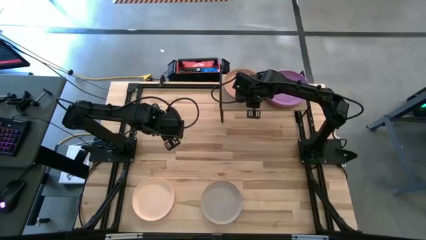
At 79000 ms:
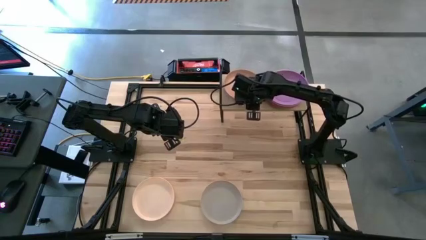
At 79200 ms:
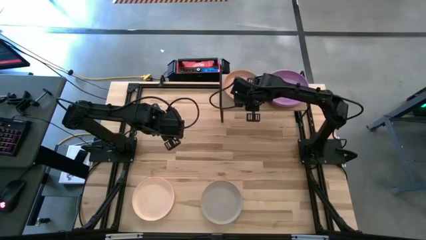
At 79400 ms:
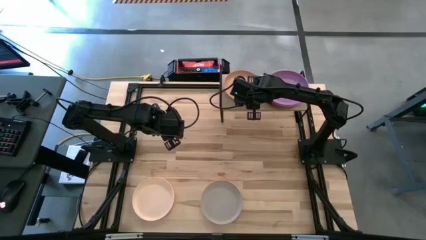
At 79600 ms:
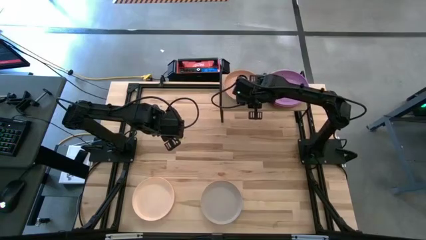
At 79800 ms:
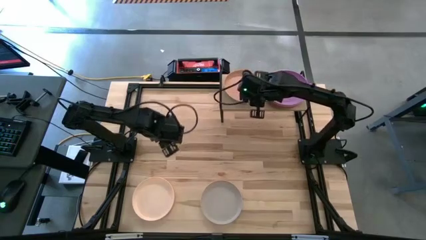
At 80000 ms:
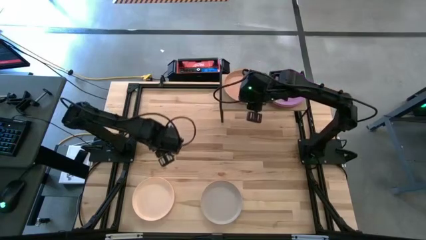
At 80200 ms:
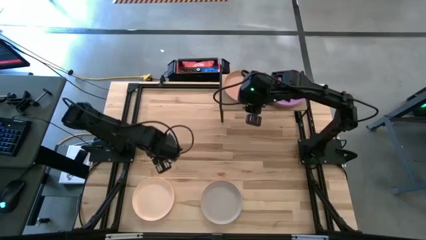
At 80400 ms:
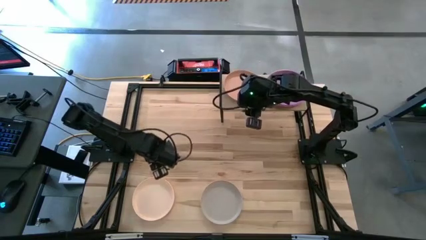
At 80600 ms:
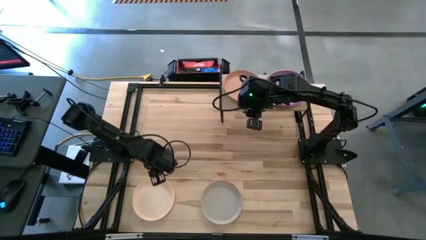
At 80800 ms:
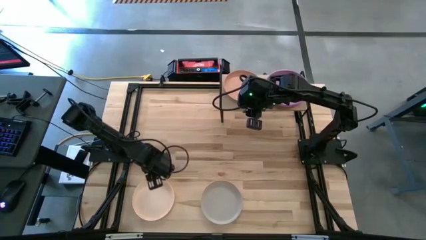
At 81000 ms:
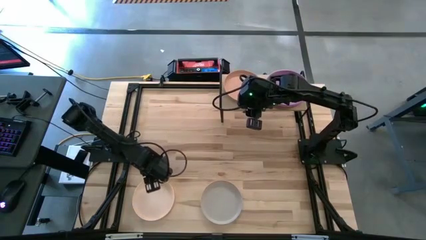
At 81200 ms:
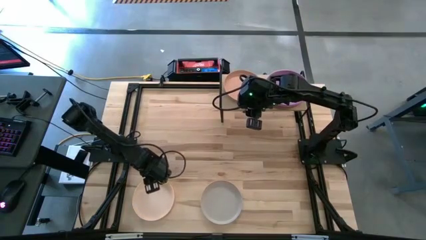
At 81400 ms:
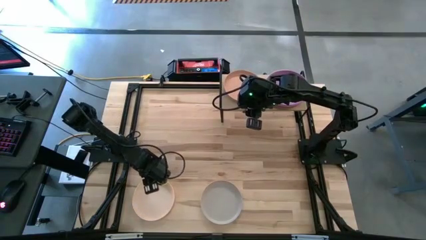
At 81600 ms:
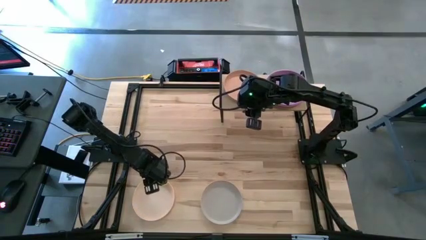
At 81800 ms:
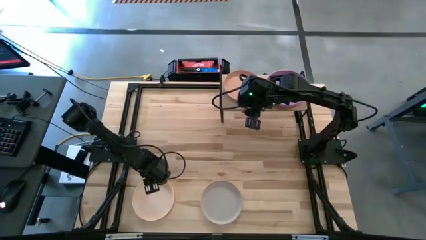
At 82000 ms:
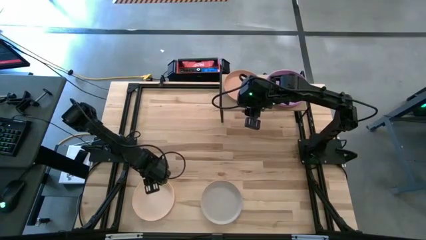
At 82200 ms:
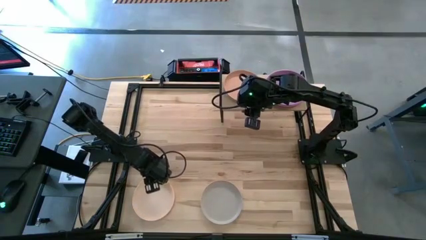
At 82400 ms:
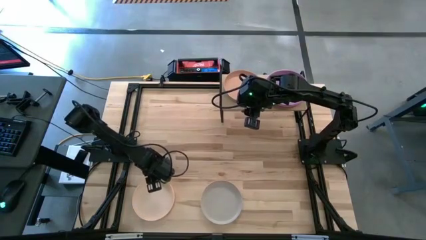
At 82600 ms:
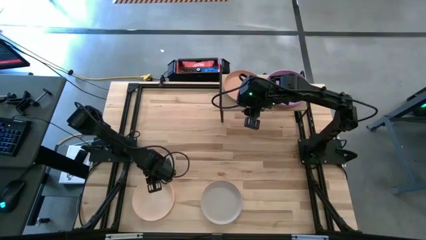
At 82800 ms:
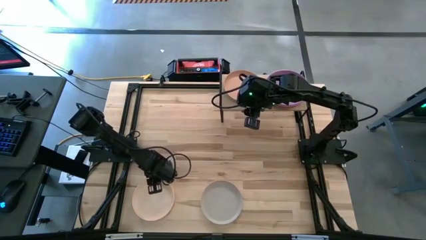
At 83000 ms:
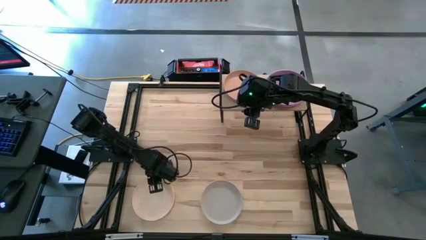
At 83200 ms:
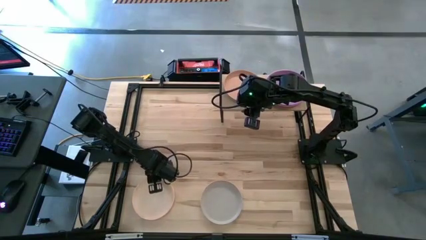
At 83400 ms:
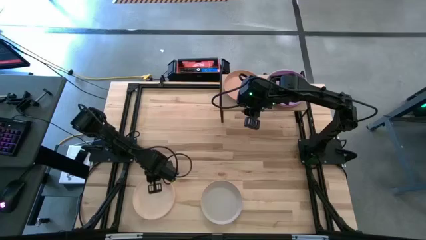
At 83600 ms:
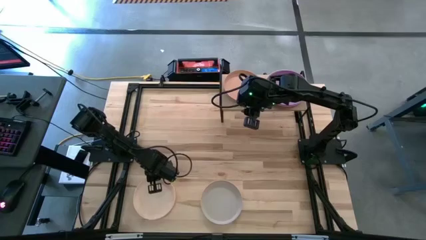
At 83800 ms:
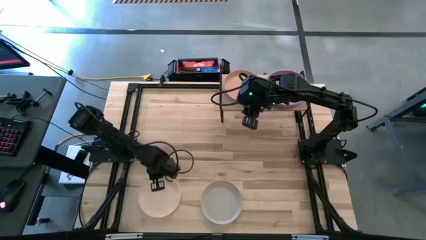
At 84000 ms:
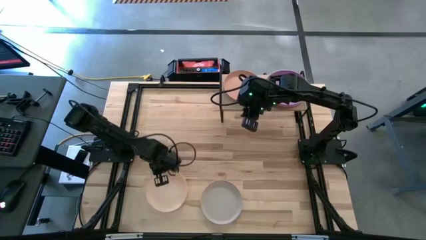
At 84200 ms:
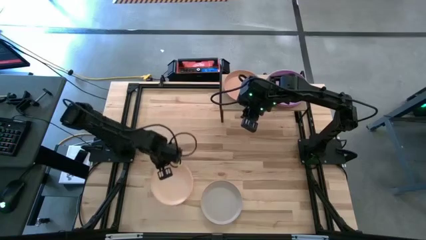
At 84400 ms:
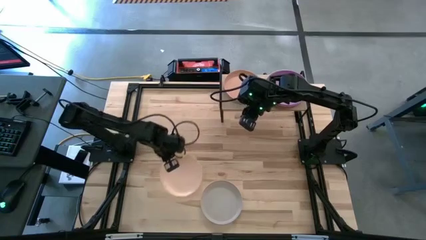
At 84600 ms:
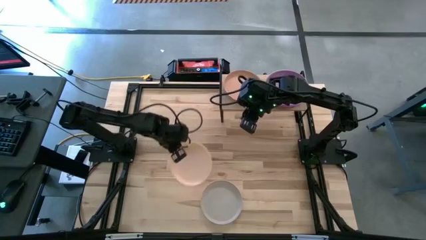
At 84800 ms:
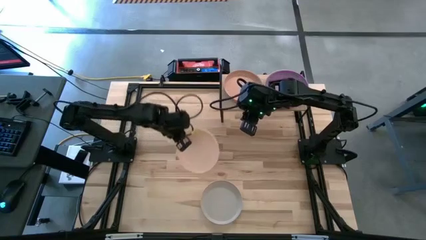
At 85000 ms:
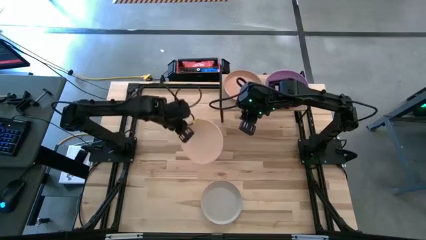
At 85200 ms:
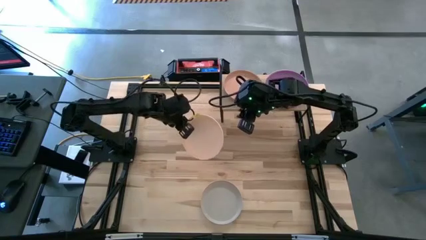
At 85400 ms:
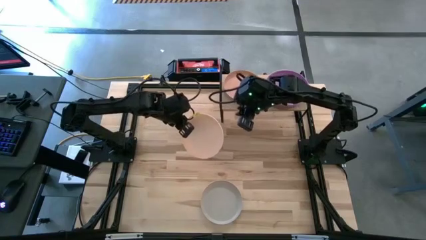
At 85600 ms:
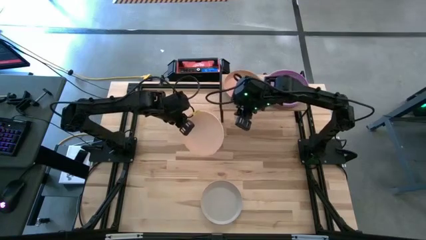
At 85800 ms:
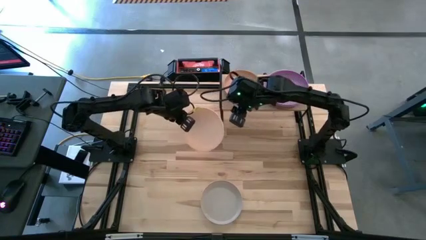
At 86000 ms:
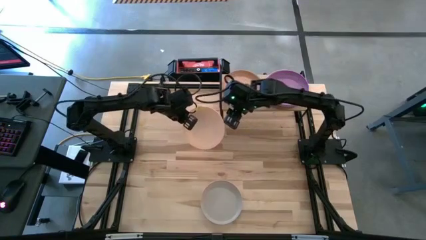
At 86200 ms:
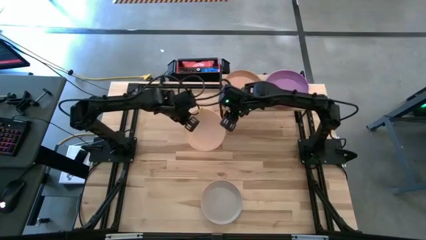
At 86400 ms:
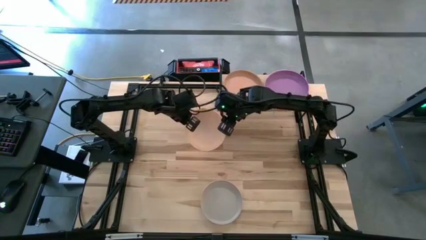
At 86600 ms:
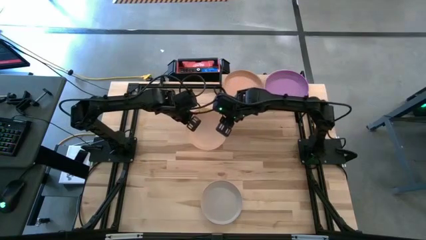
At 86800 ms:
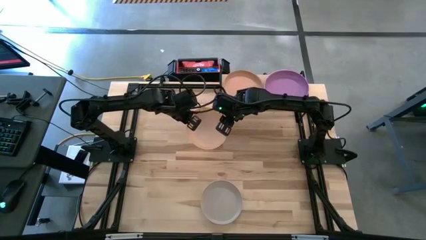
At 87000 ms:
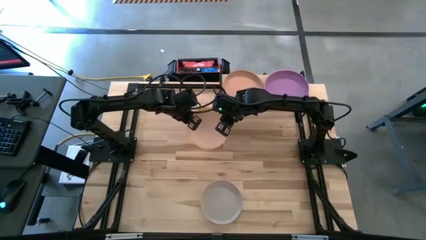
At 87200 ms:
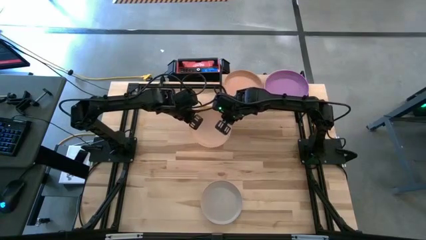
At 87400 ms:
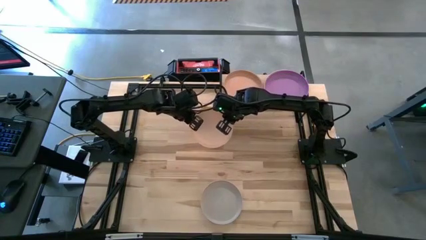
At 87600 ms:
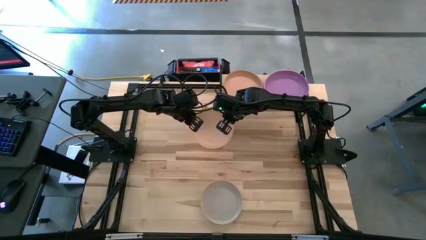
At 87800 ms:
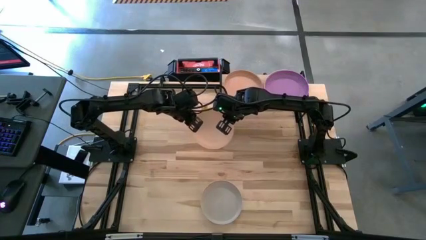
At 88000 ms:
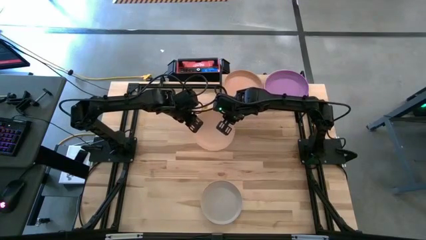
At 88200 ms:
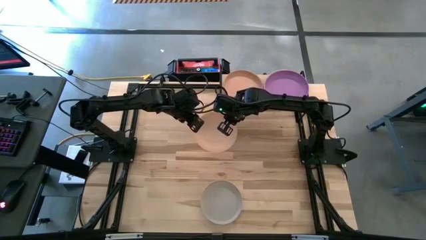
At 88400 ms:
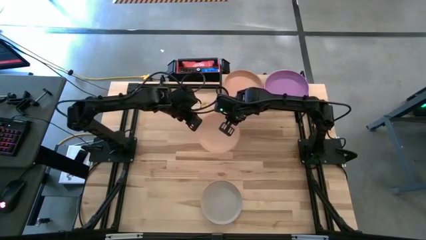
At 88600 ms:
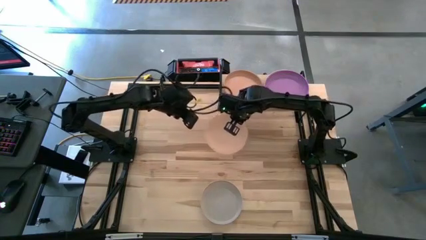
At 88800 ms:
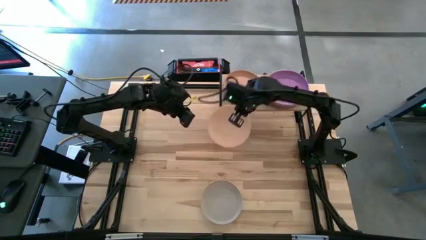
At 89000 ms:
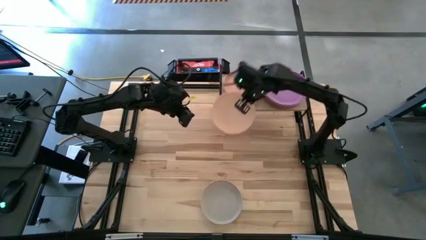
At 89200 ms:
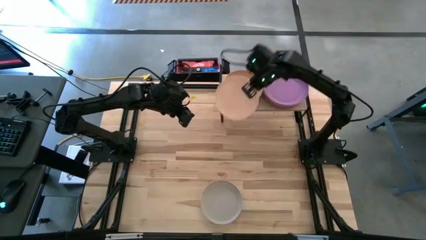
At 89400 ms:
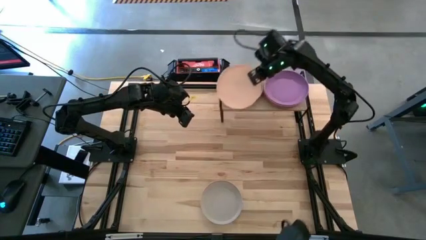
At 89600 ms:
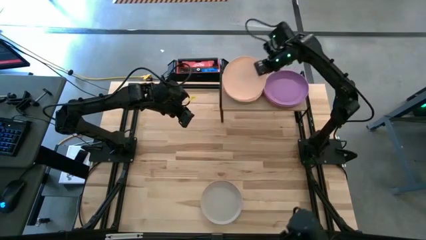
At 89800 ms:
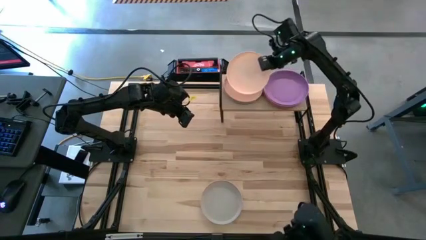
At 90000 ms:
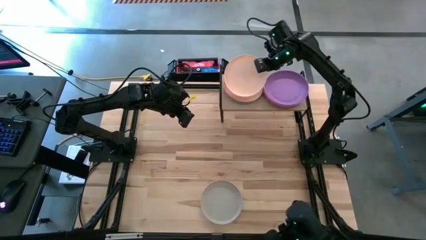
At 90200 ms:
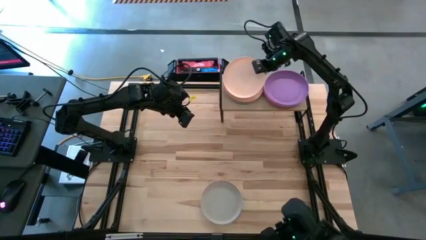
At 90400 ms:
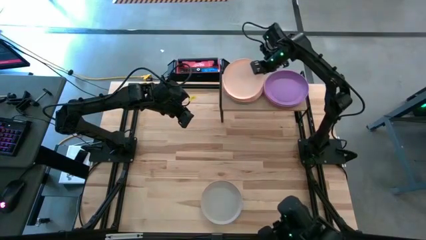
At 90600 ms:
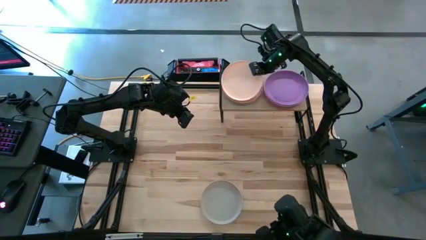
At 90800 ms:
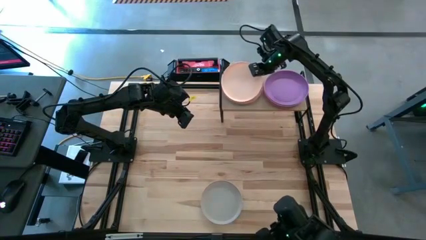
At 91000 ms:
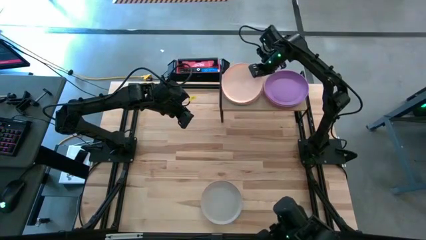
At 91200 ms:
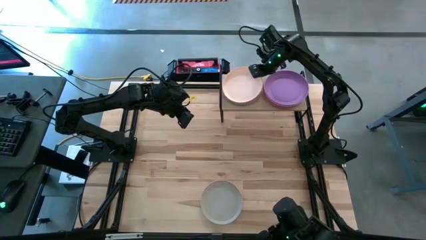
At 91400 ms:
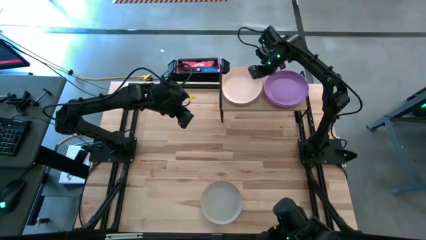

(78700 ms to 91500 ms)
Task: Place and stack plates onto a shelf
Stack the beige plate on top of the light orange plate on the shelf
